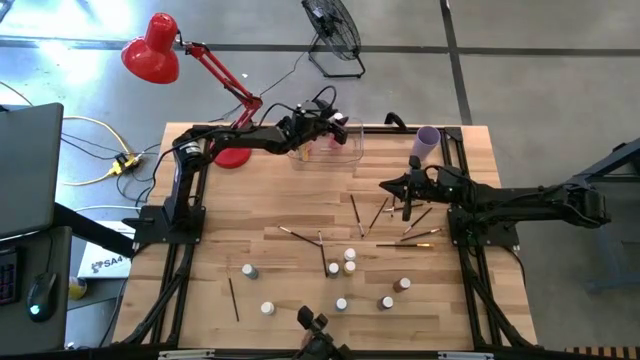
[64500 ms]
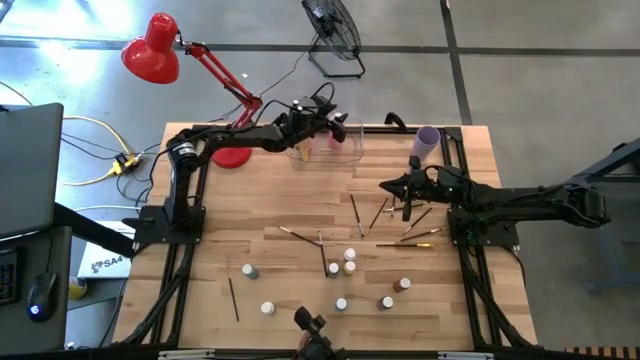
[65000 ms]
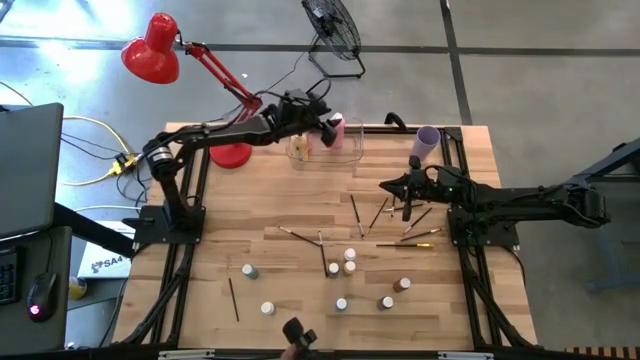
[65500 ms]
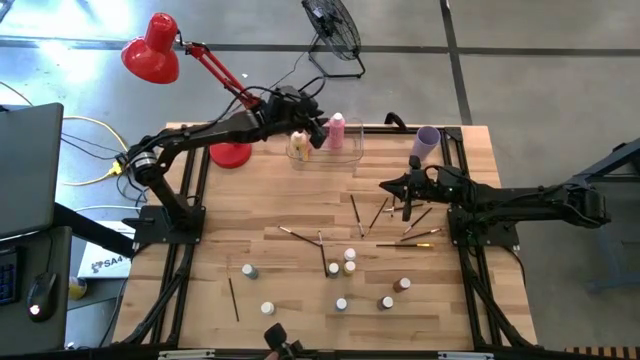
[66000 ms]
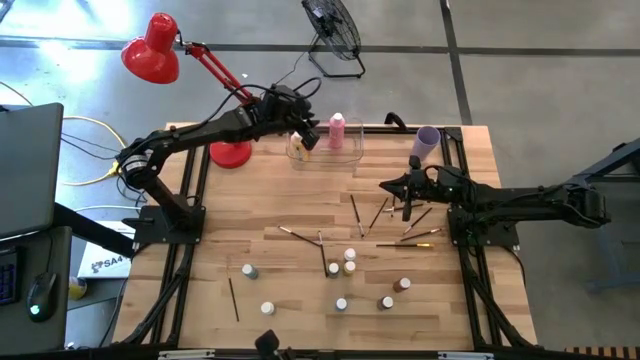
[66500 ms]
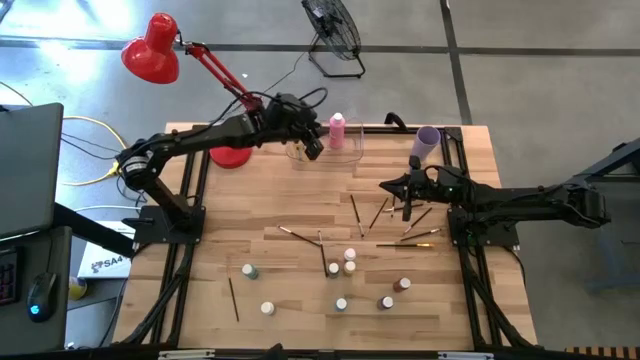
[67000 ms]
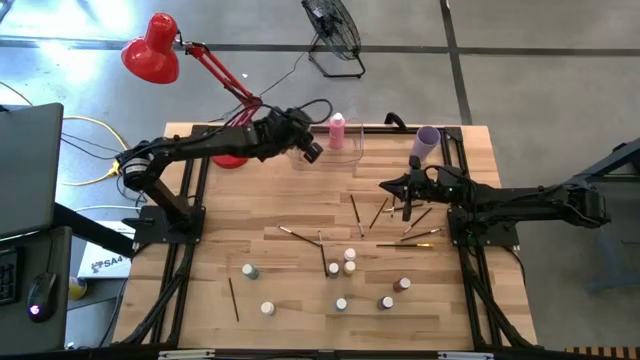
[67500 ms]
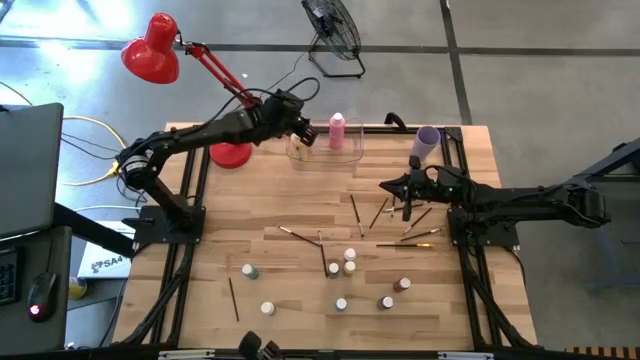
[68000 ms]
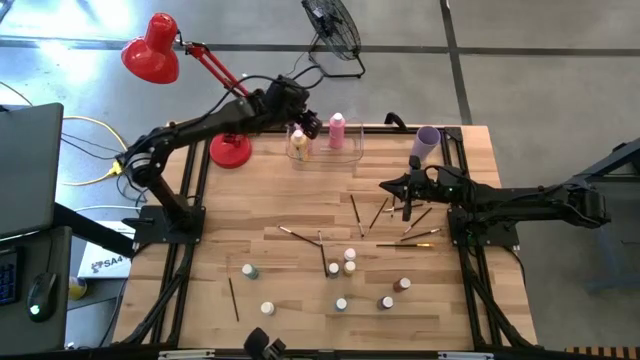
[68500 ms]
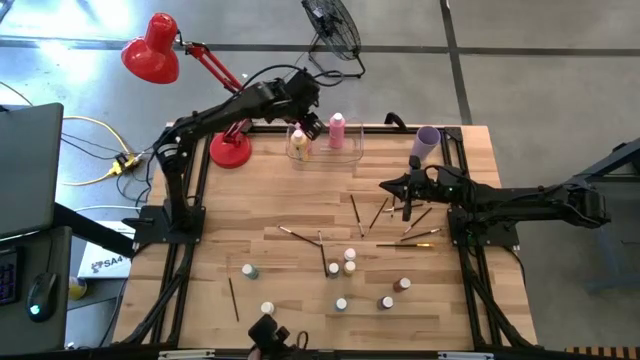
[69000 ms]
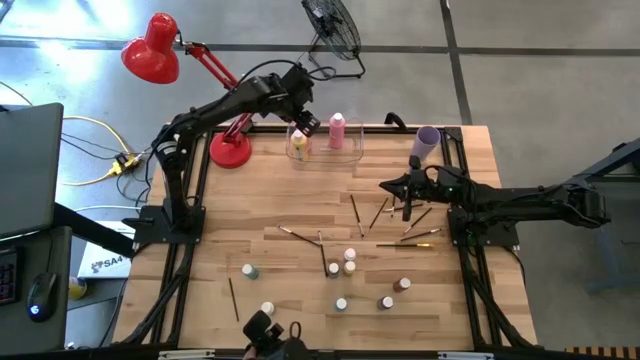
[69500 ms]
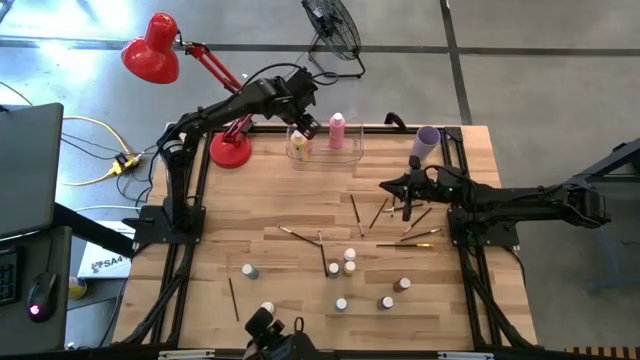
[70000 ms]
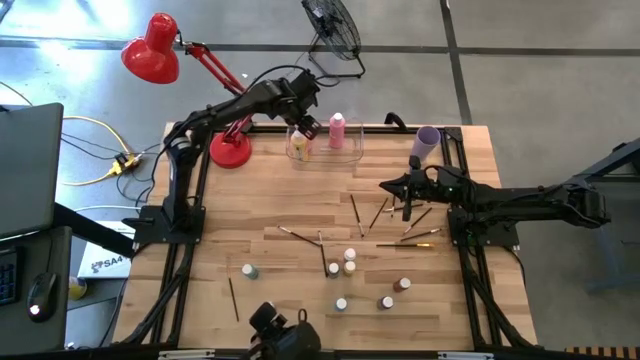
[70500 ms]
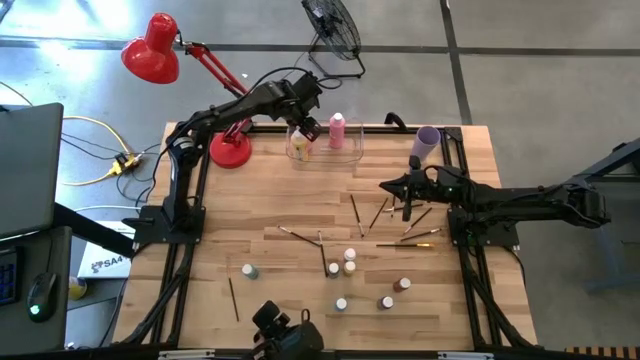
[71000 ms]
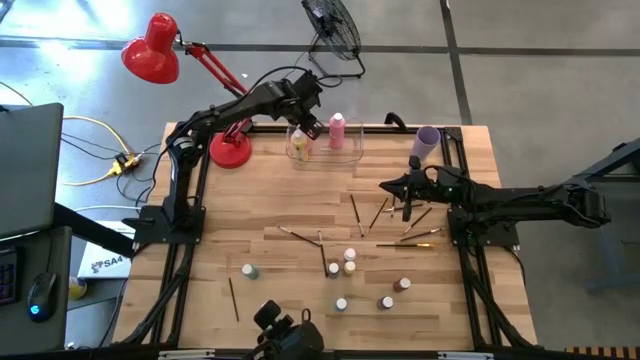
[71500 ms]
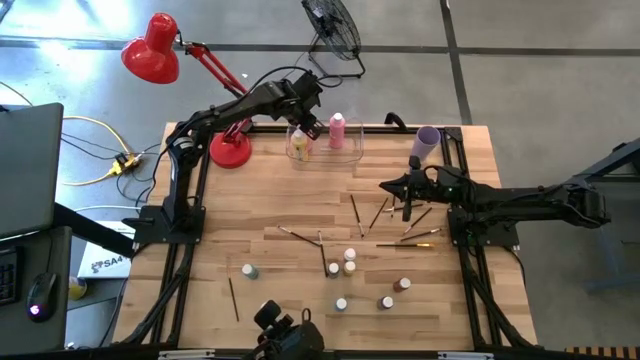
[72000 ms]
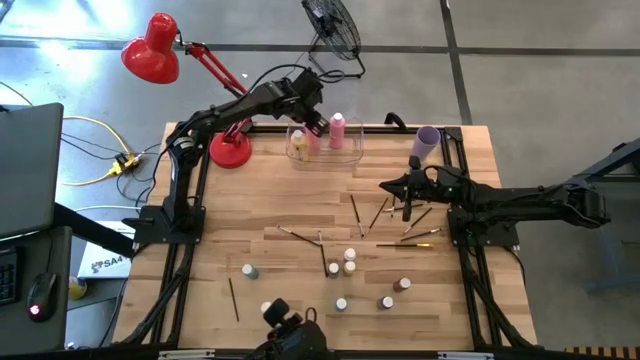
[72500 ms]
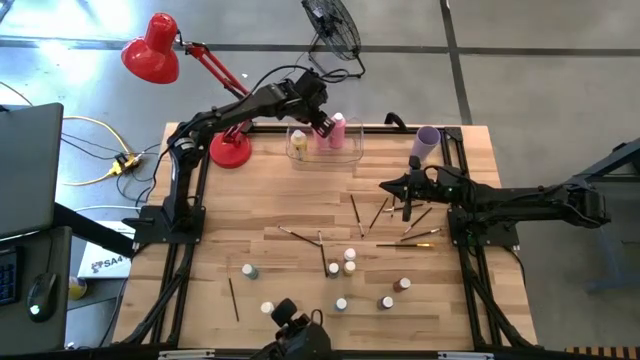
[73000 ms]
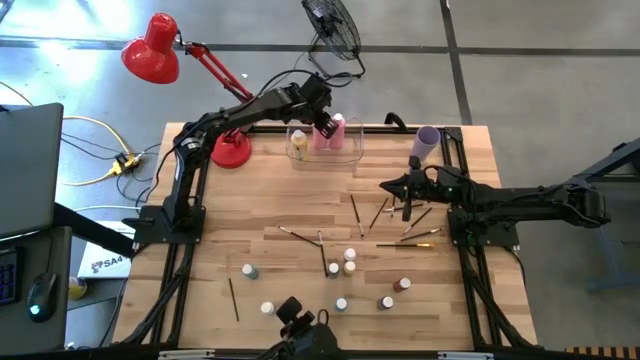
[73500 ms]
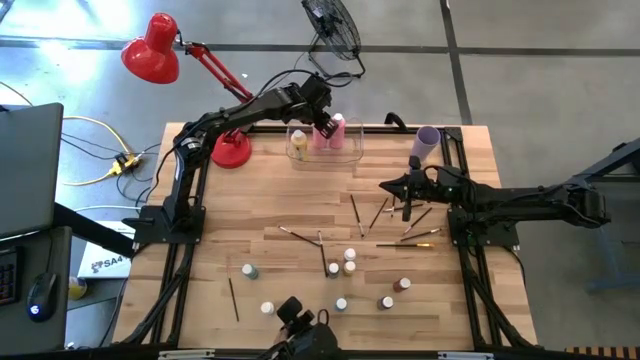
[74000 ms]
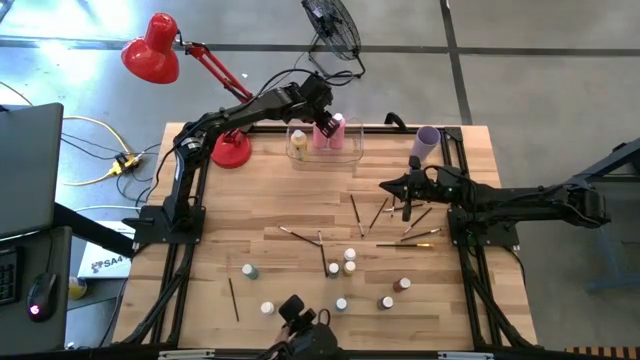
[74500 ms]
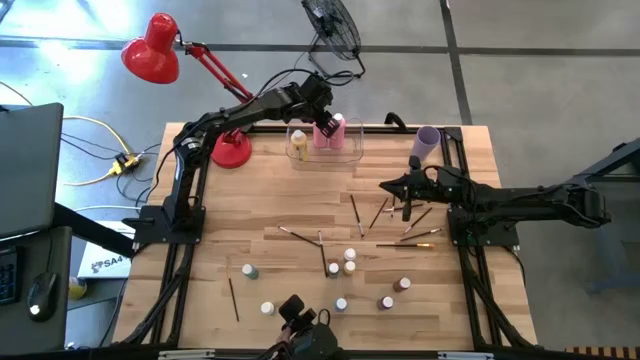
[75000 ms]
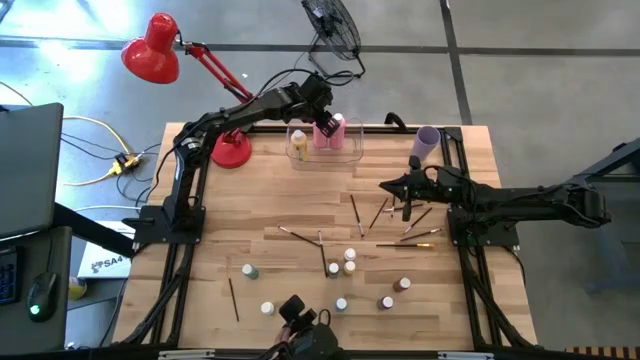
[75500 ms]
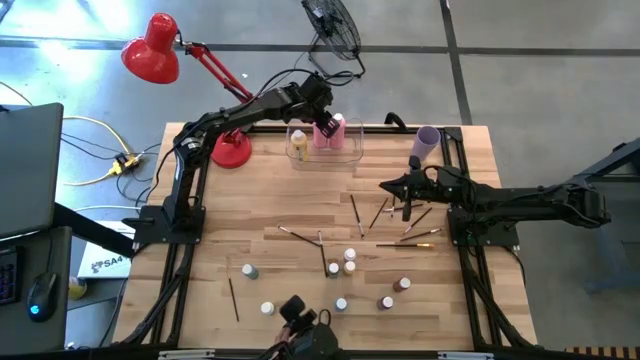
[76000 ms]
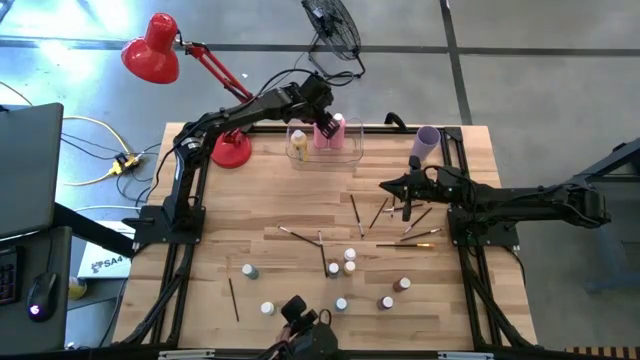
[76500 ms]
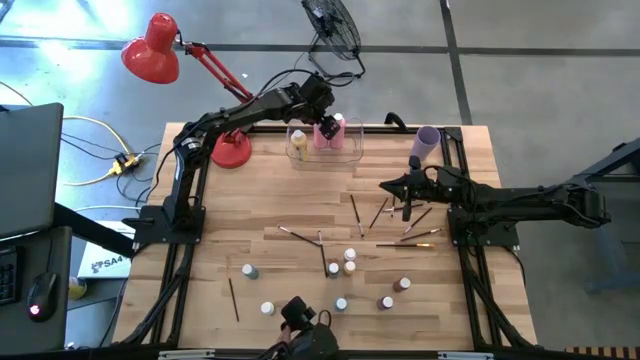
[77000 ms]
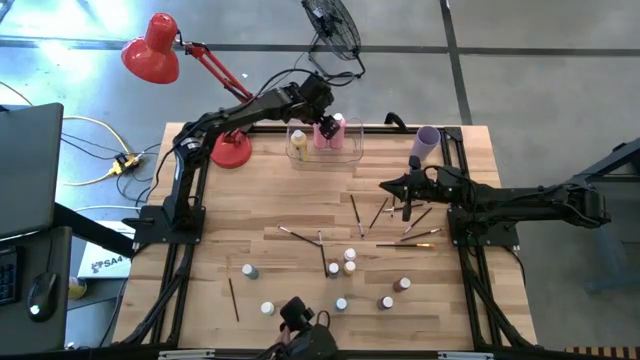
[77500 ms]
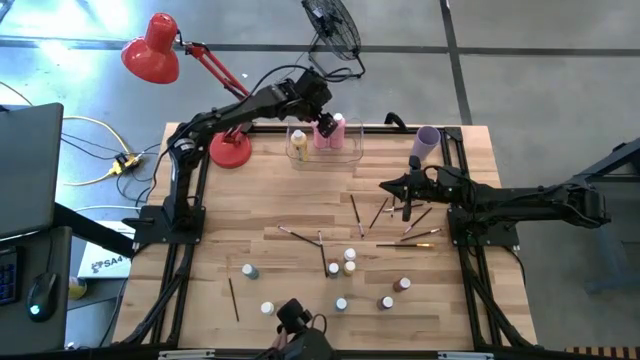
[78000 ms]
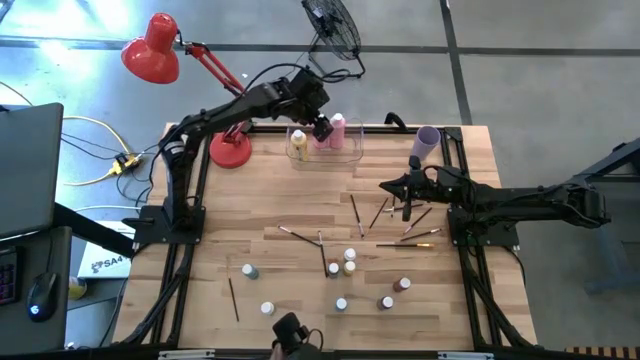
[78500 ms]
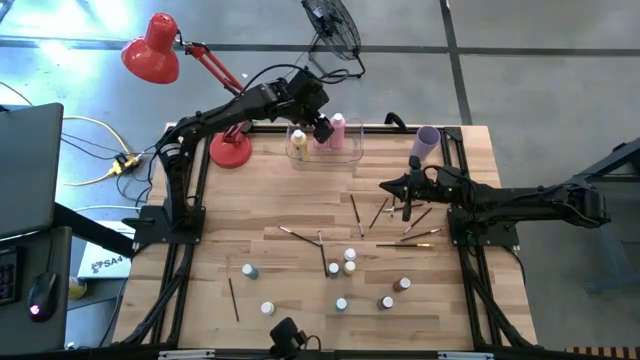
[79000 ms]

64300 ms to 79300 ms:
Task: Pick & Place Paint Supplies
Adjust the large paint bottles in the transparent bin

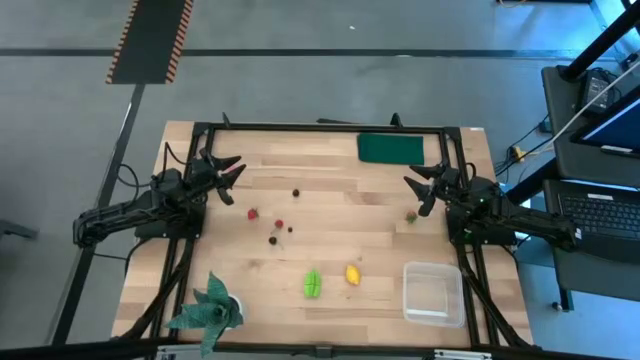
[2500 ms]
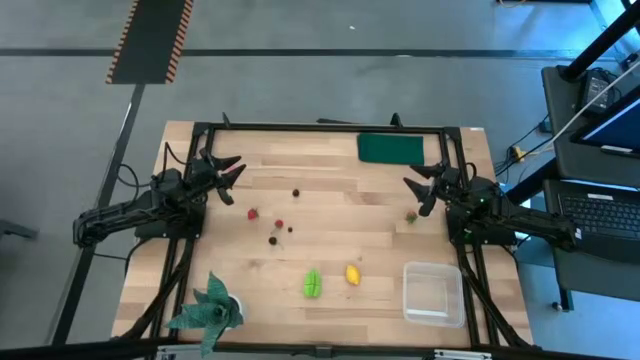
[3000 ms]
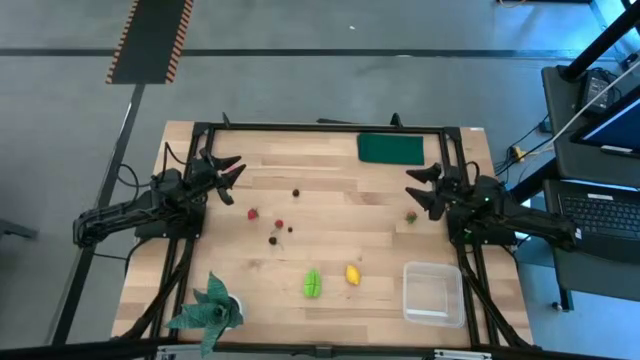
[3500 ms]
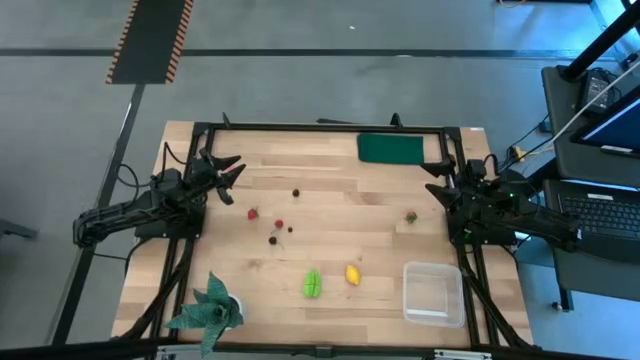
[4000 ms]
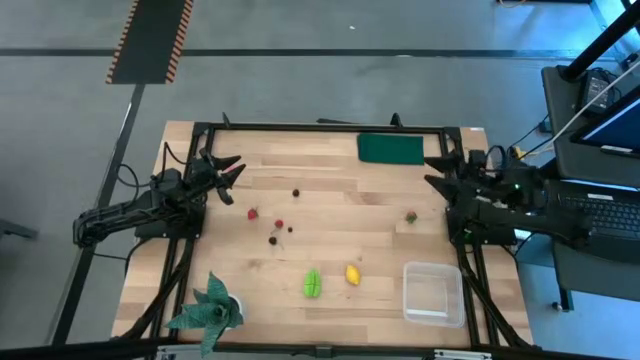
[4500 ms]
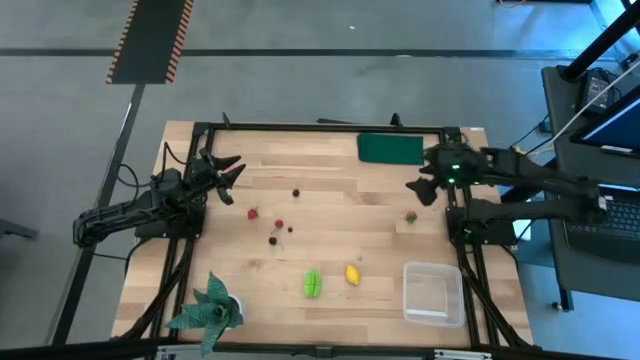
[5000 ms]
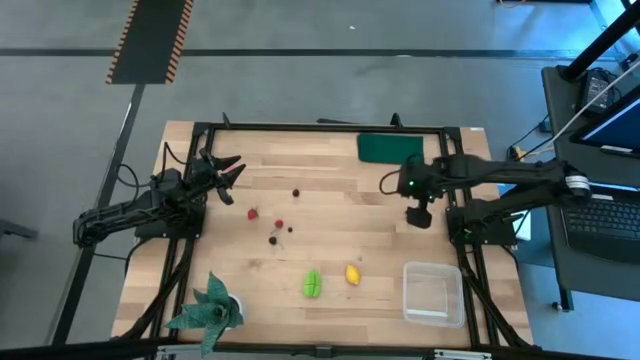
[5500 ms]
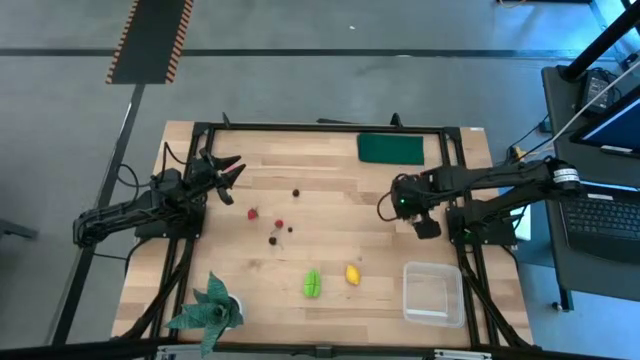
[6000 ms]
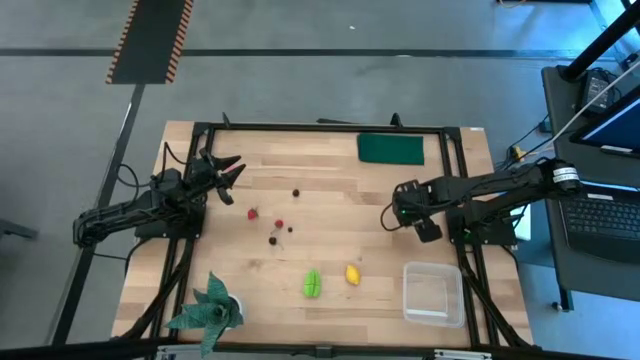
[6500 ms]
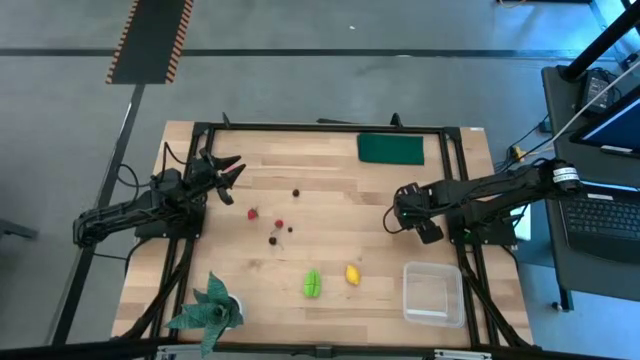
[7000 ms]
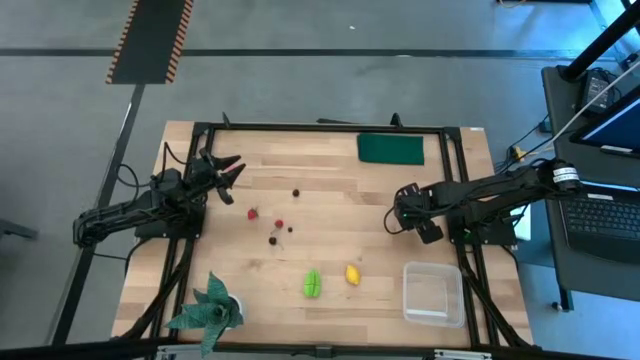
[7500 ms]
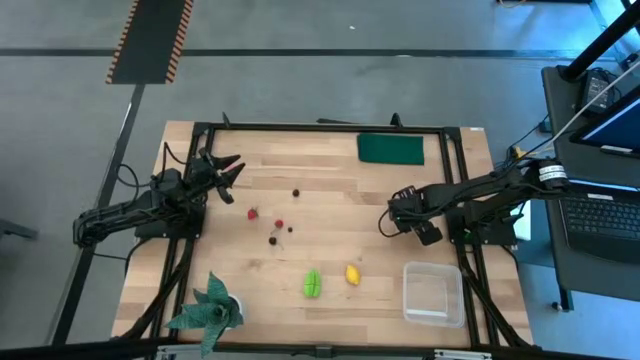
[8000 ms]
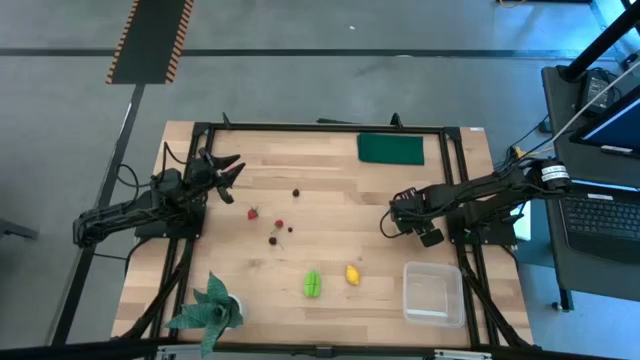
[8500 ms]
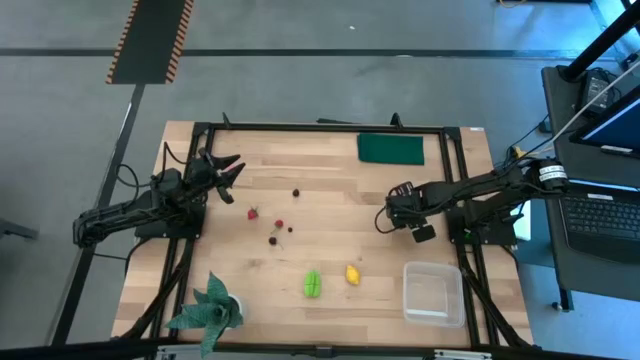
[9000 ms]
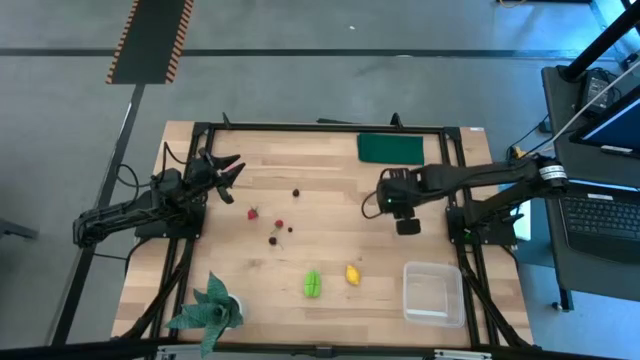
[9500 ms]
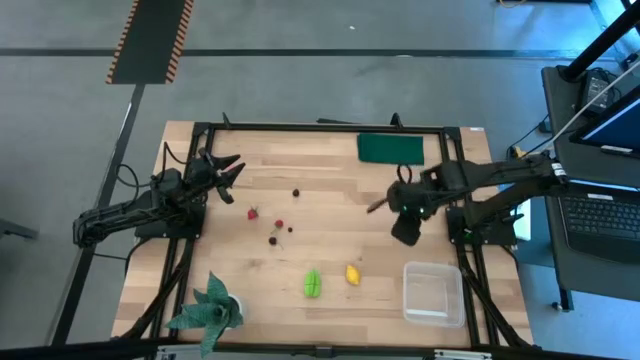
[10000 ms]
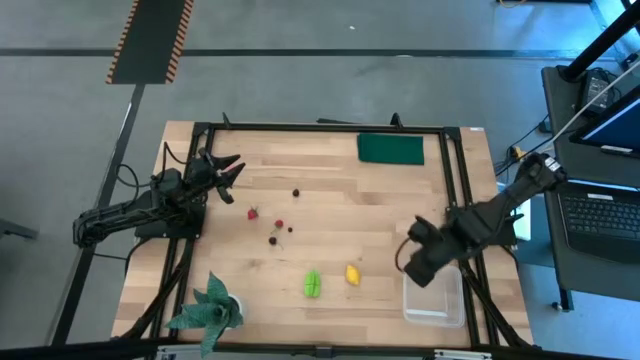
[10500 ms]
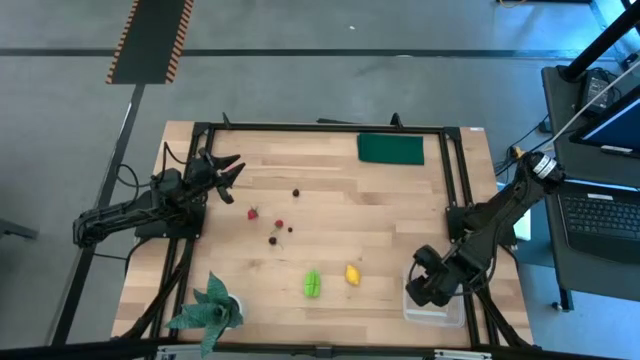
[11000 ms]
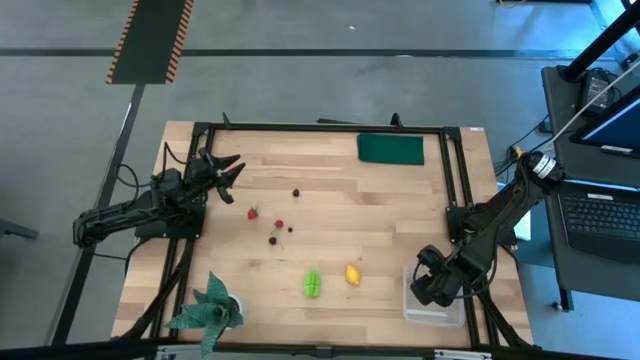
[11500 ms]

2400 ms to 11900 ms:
Task: Pick and placing Produce into tupperware
Put the right red strawberry into the transparent bin
